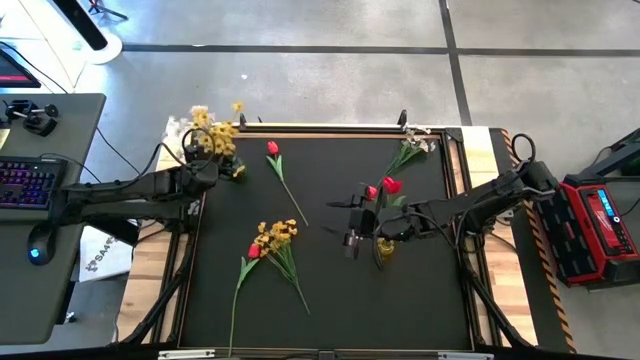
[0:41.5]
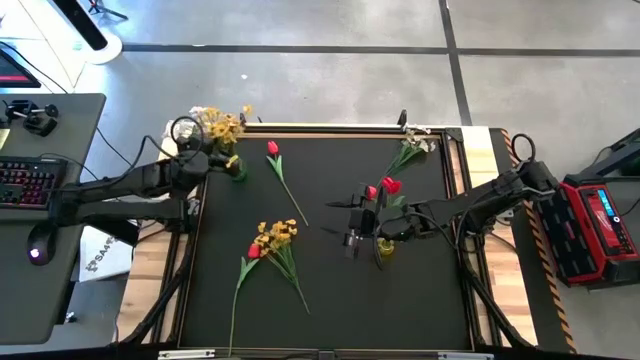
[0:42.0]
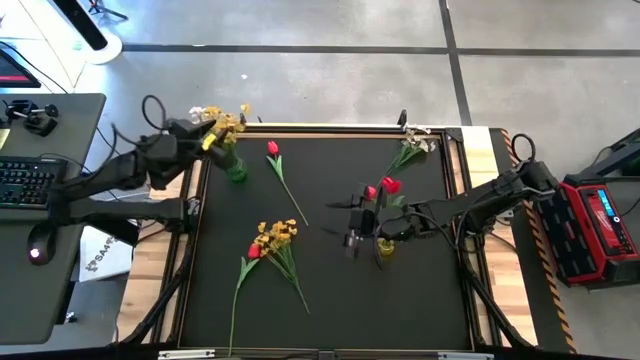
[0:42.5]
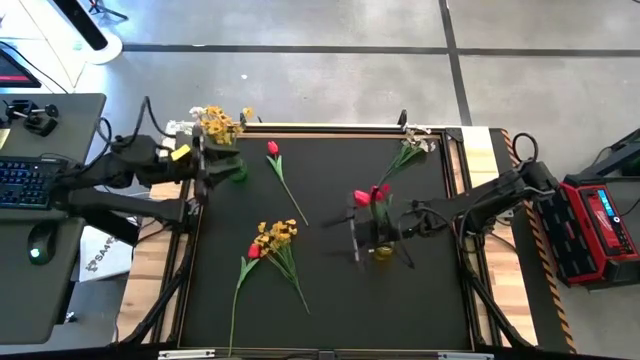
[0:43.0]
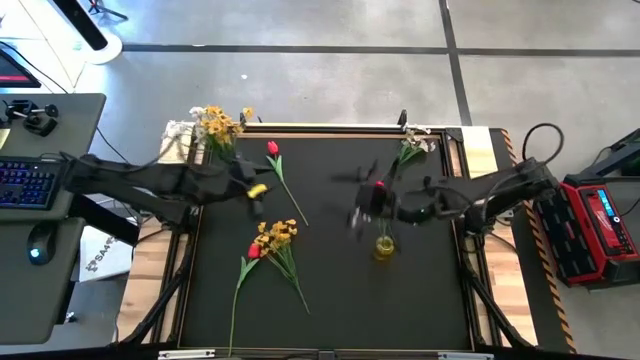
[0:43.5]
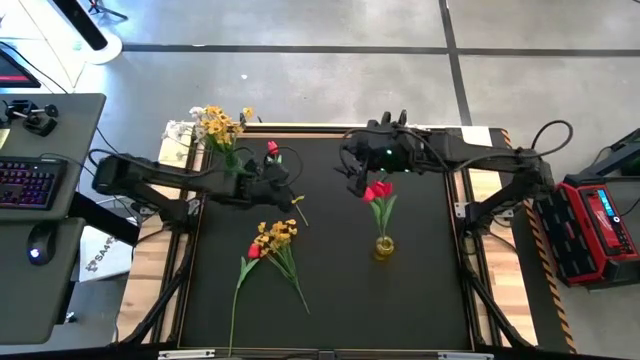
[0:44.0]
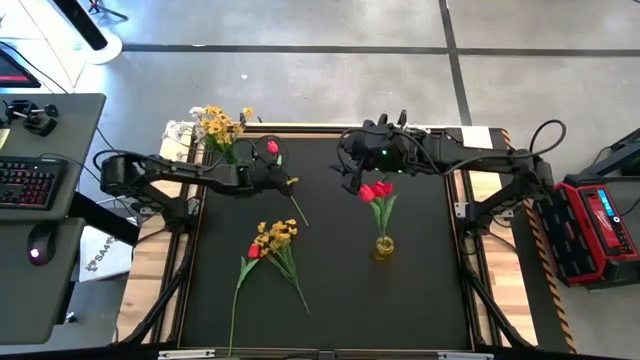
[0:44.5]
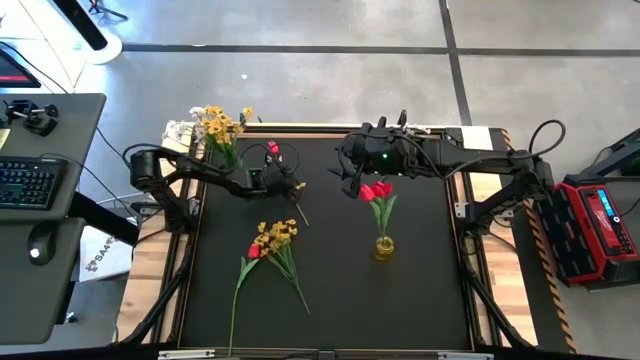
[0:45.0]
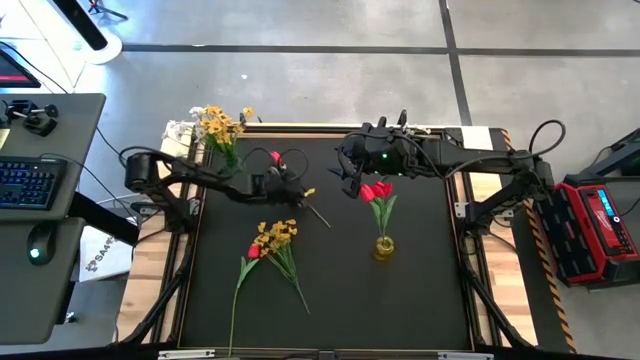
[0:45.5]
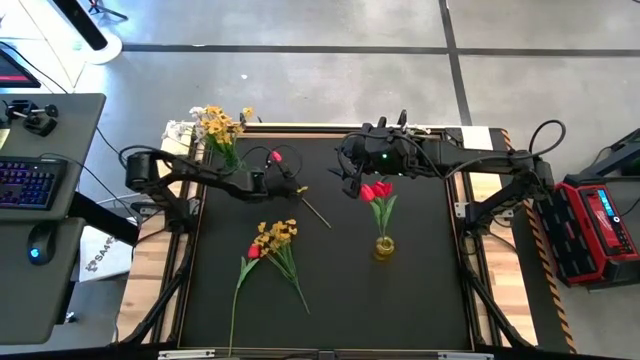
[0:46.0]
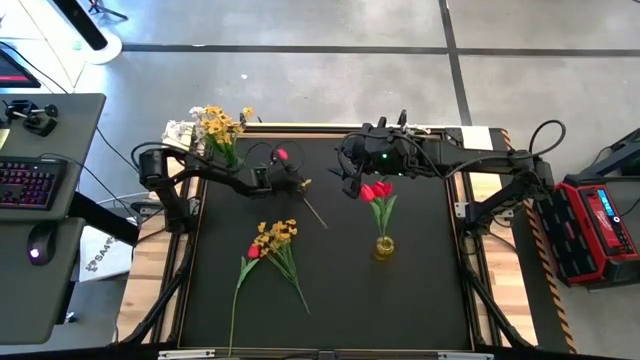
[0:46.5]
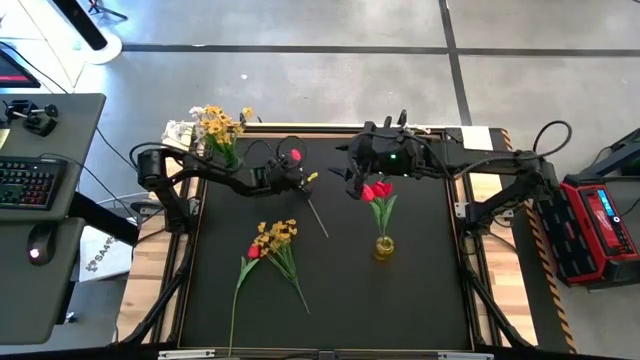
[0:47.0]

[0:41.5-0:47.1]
Task: Sort flowers into vase by color
Put the top red flower into the yellow flower vase

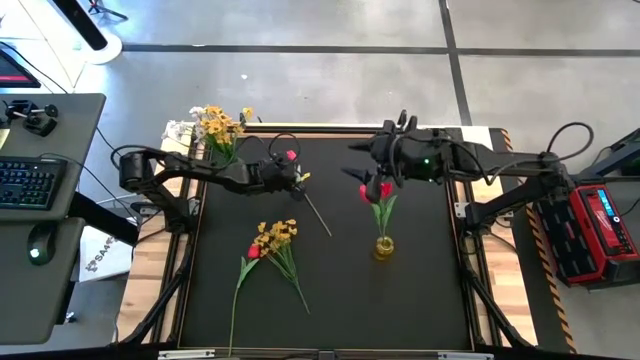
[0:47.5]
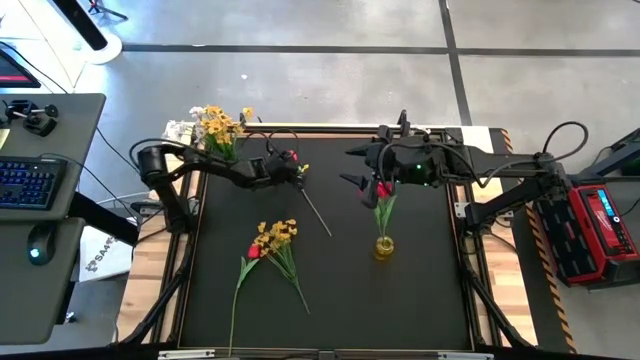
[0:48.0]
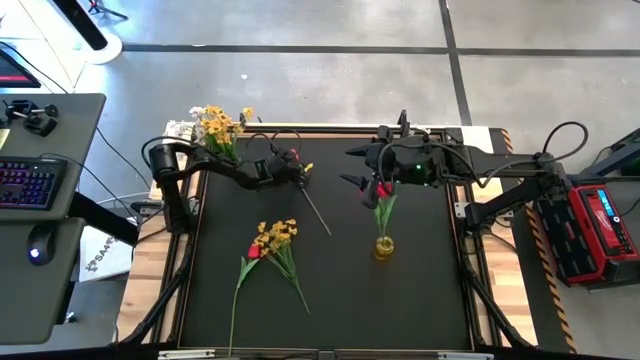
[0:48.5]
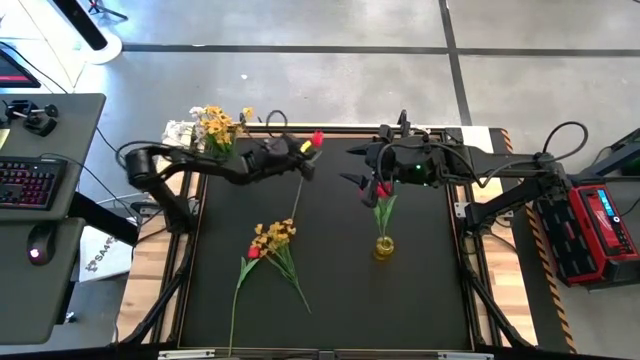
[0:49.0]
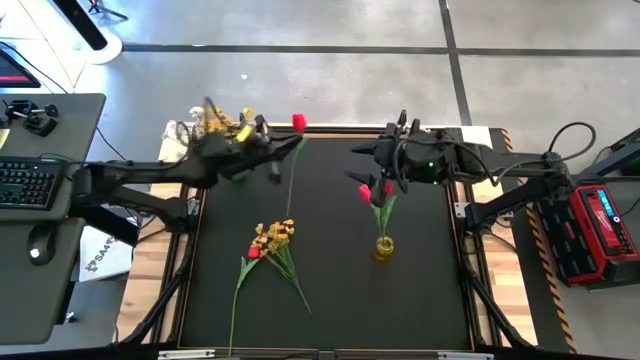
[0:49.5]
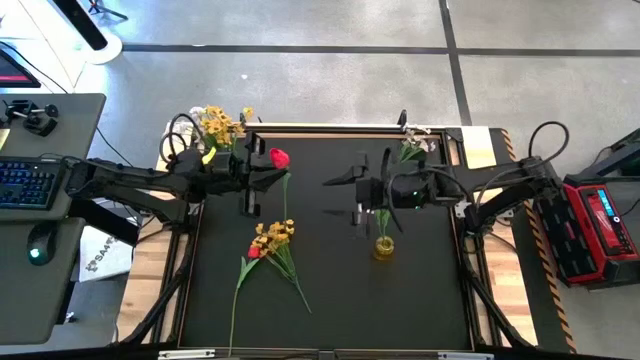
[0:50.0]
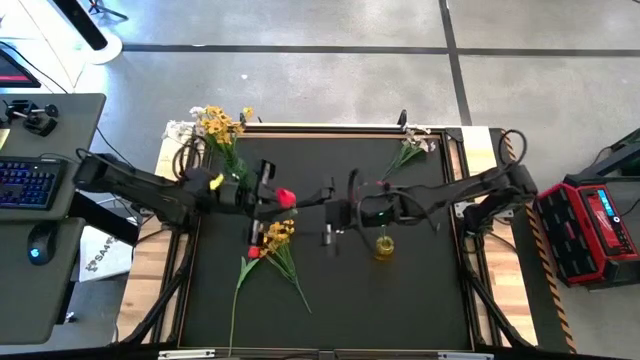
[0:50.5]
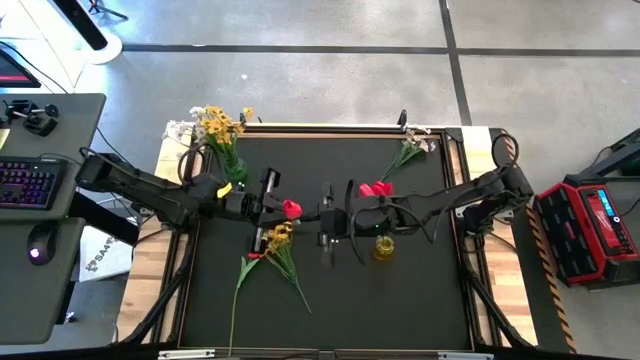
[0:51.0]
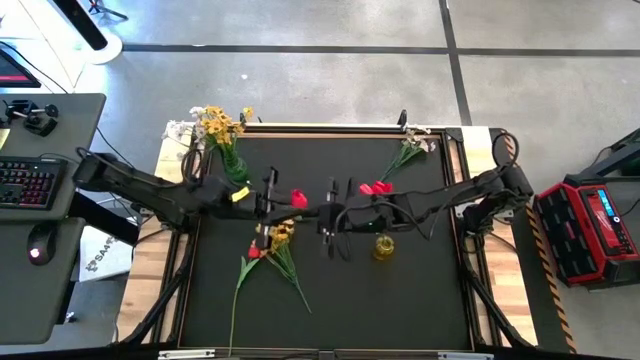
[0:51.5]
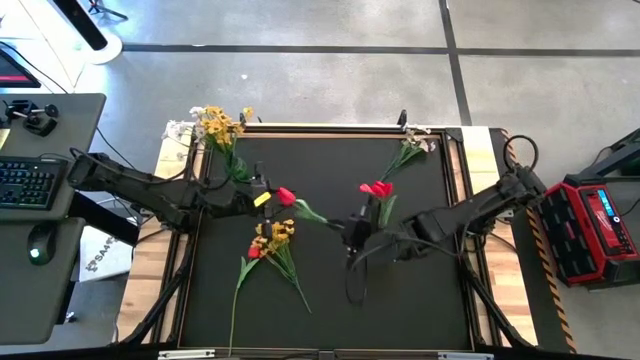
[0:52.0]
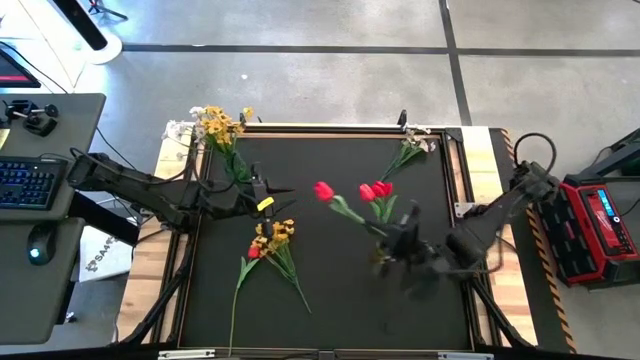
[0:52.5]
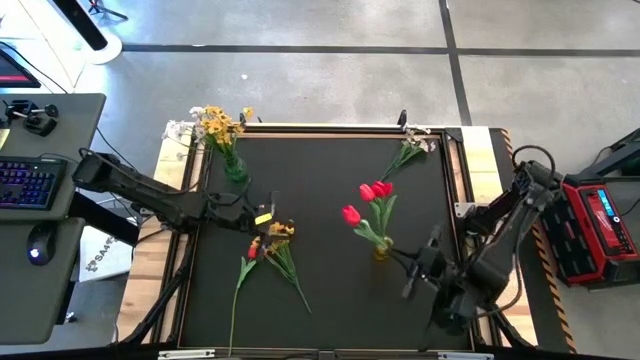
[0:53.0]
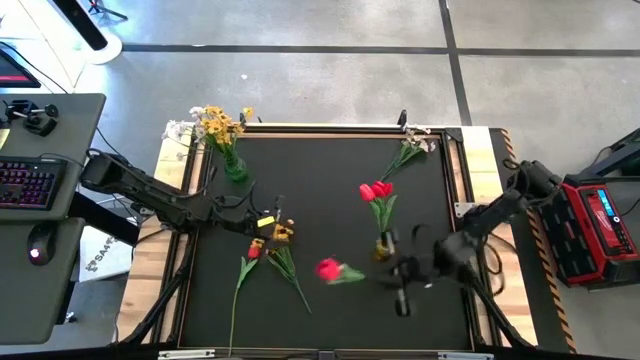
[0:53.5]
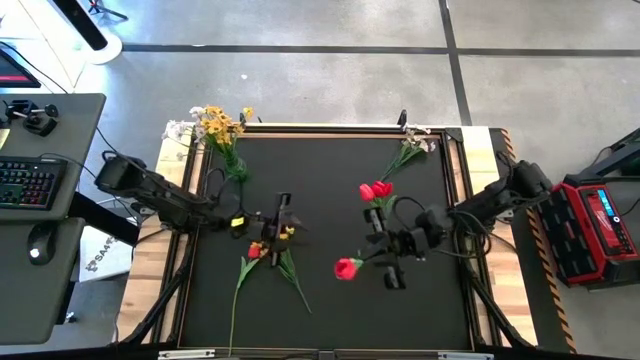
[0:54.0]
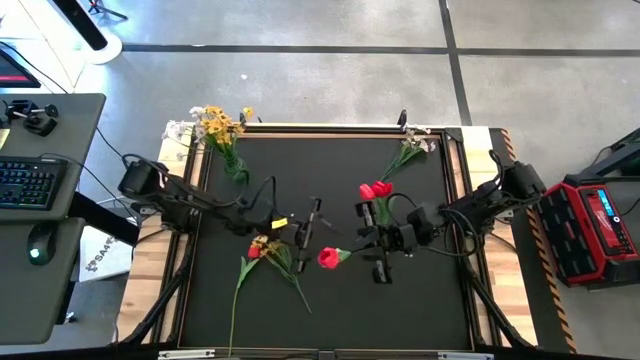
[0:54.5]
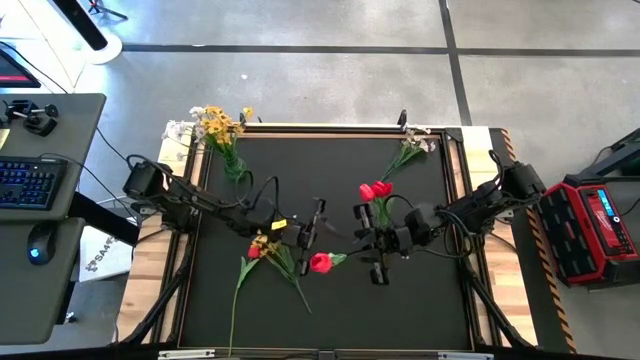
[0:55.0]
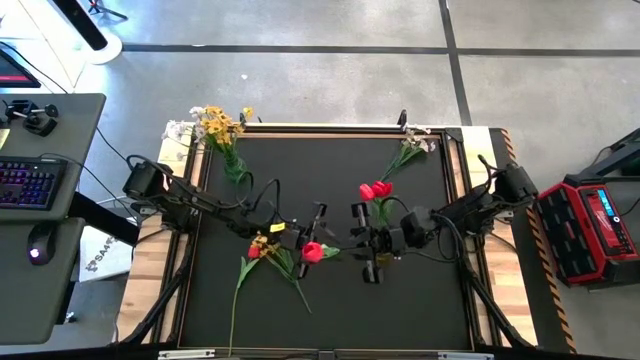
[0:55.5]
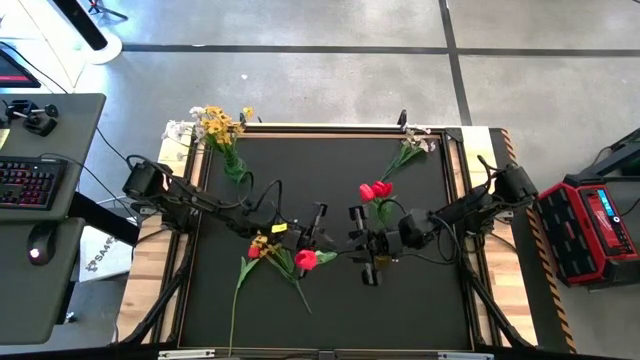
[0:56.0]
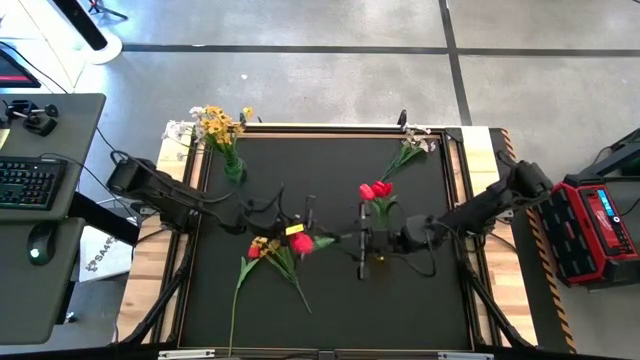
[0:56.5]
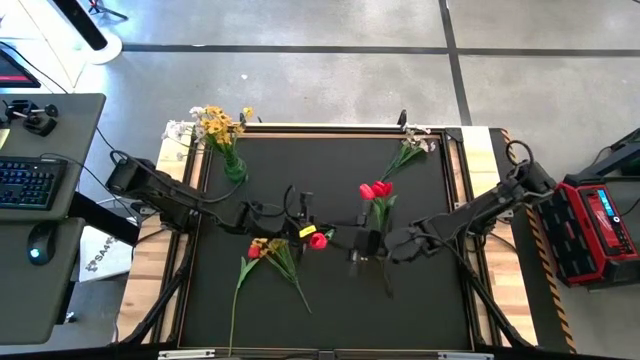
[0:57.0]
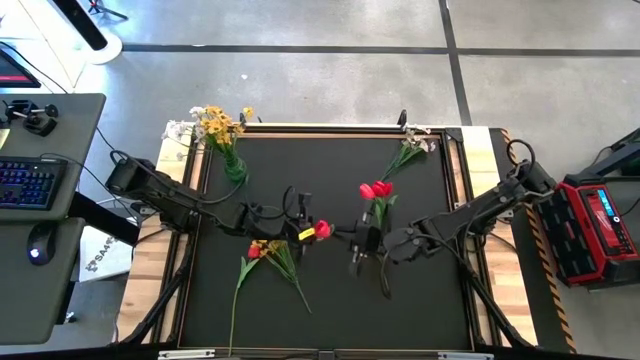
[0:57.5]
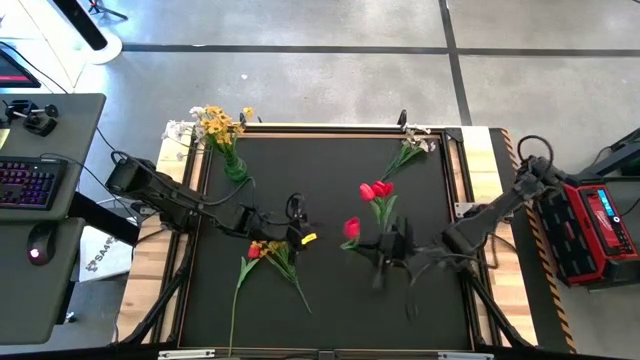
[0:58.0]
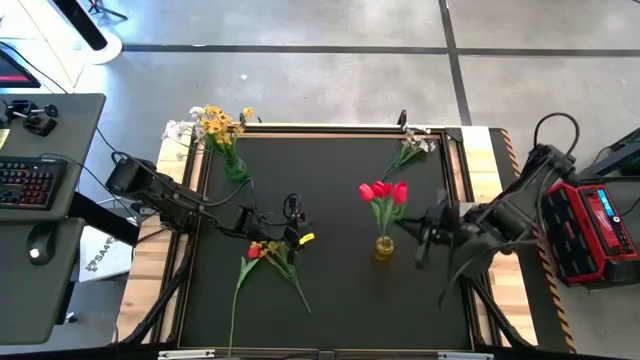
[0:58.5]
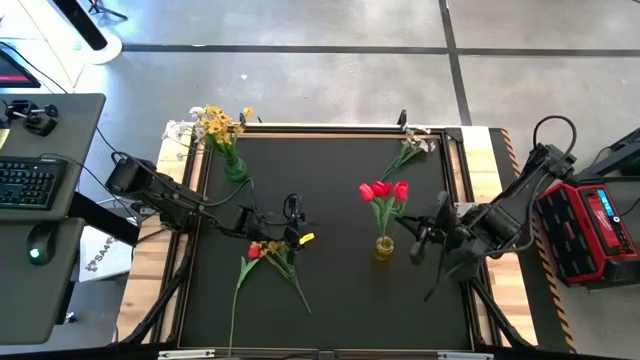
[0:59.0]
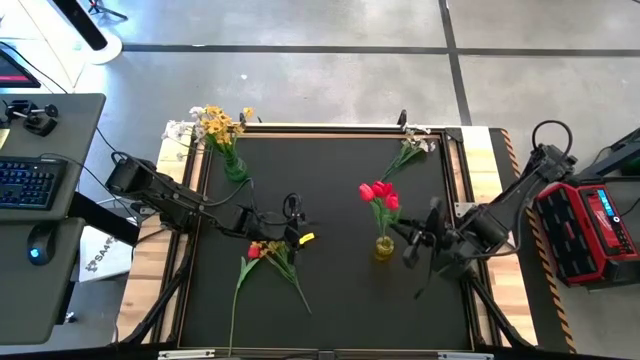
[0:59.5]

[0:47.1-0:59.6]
Put the top red flower into the yellow flower vase

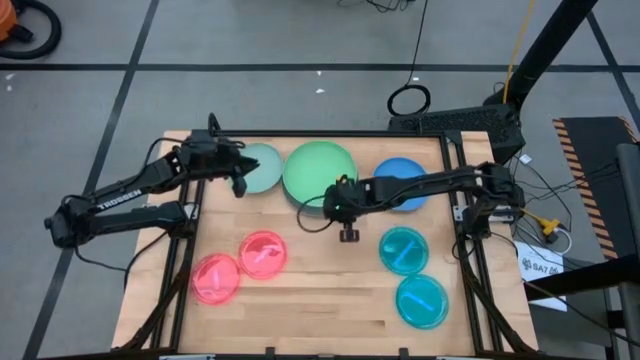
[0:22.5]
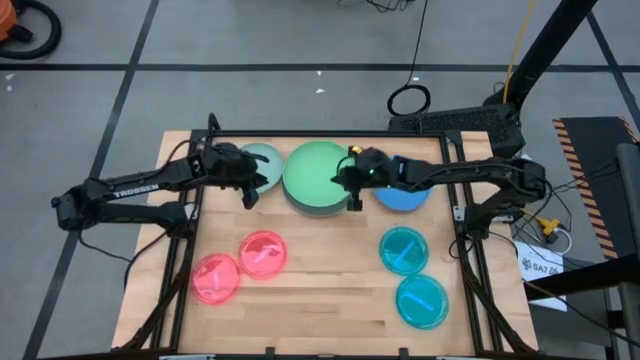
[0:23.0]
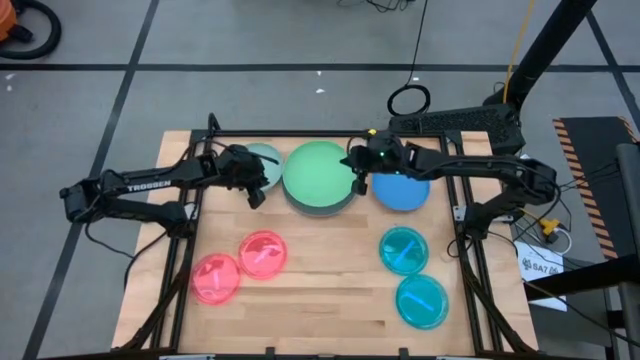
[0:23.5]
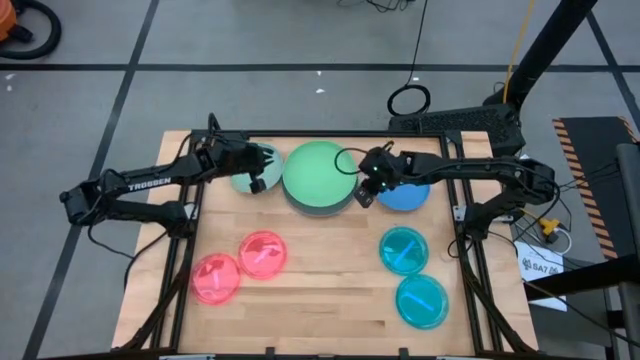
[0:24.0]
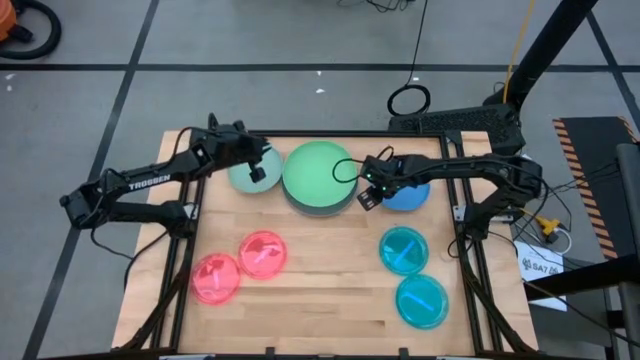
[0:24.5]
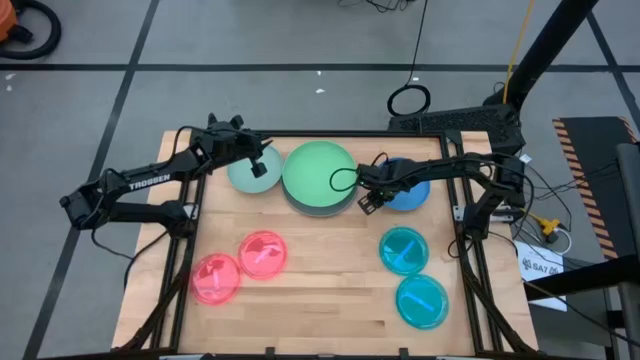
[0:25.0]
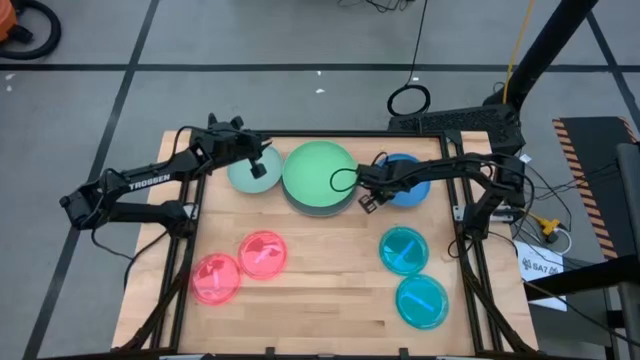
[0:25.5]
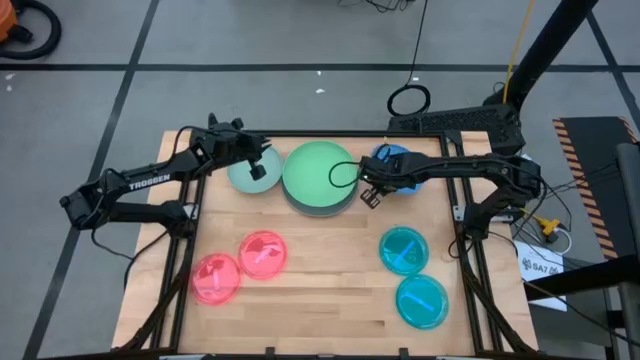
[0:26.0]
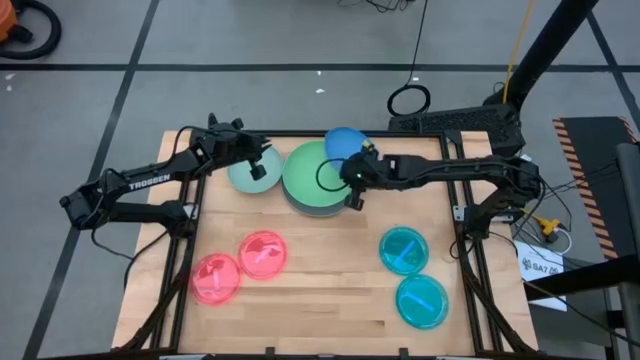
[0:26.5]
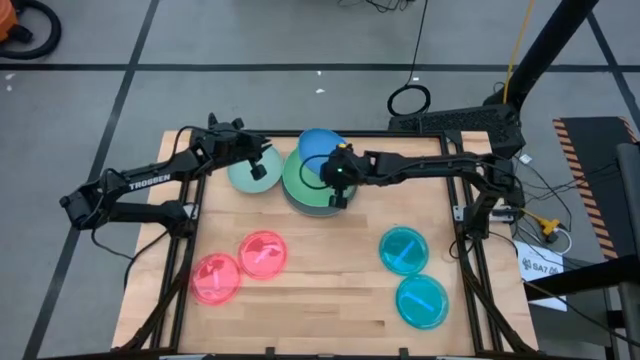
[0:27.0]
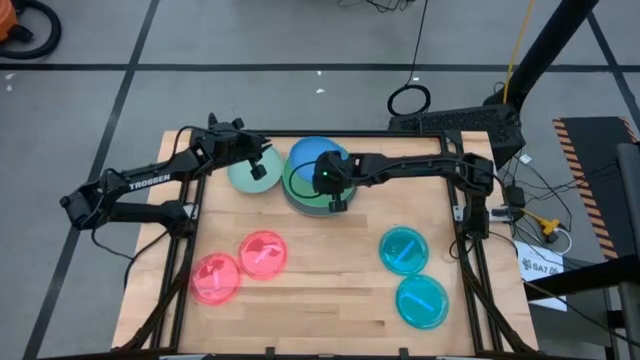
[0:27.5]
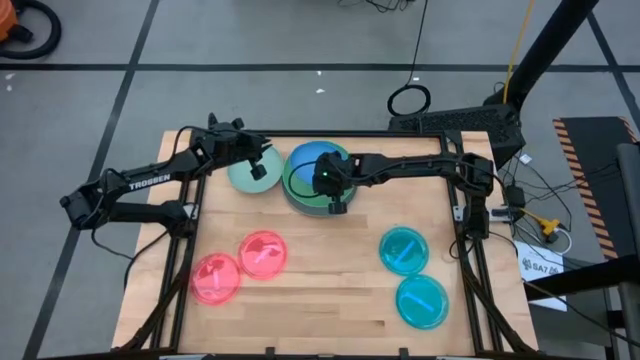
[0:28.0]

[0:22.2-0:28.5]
Task: Stack plastic plates
Stack the dark blue plate on the green plate
